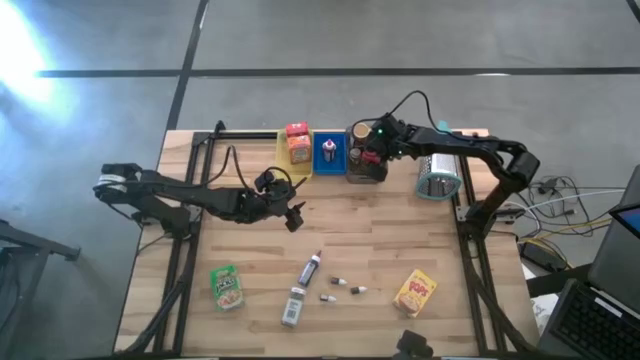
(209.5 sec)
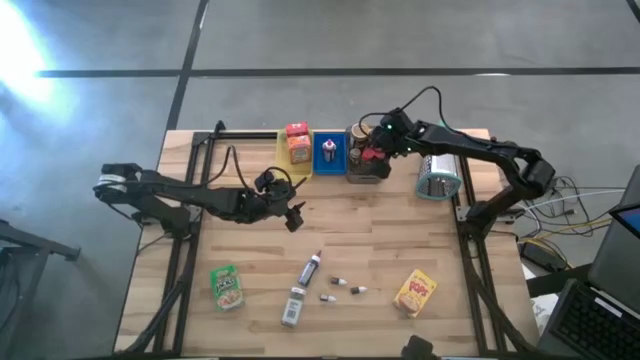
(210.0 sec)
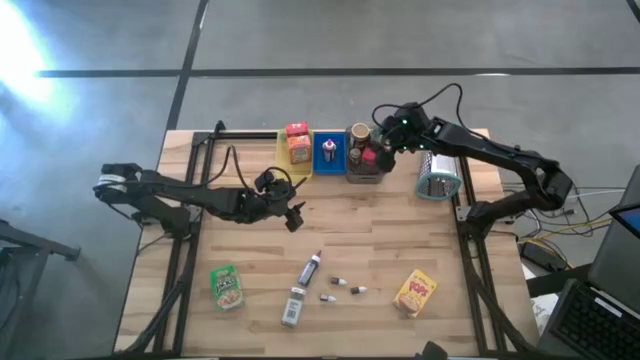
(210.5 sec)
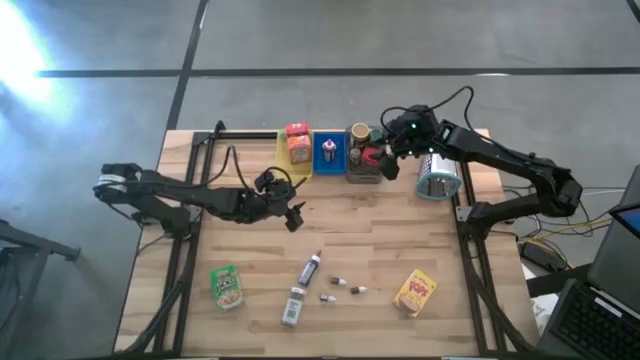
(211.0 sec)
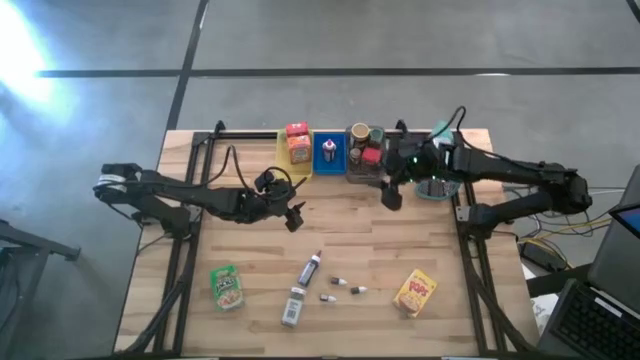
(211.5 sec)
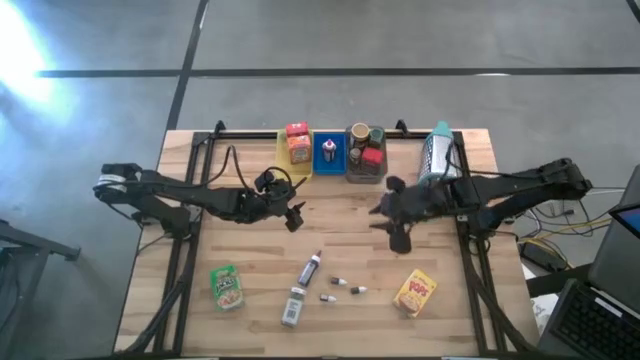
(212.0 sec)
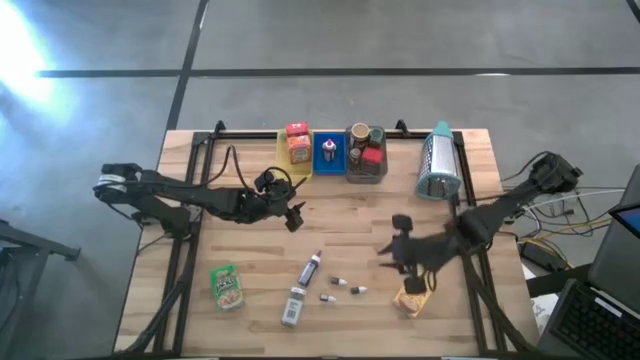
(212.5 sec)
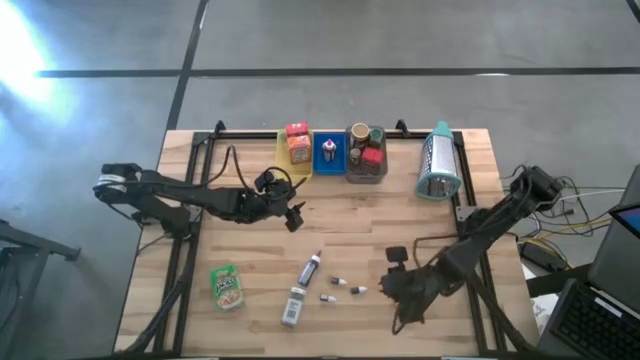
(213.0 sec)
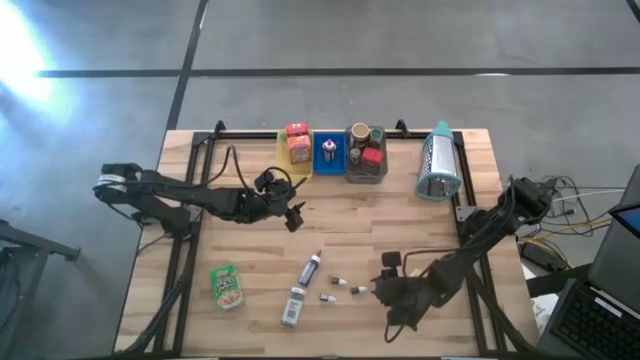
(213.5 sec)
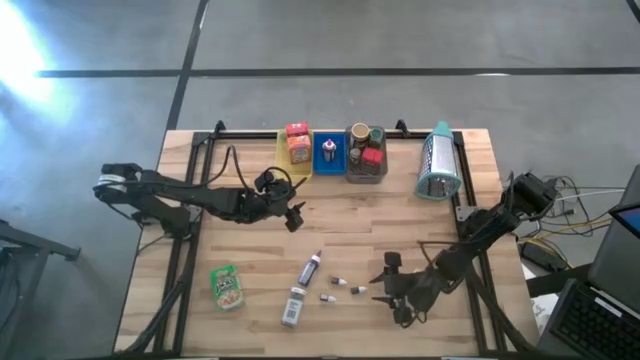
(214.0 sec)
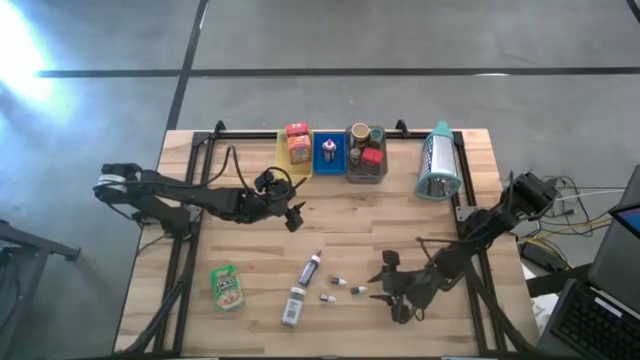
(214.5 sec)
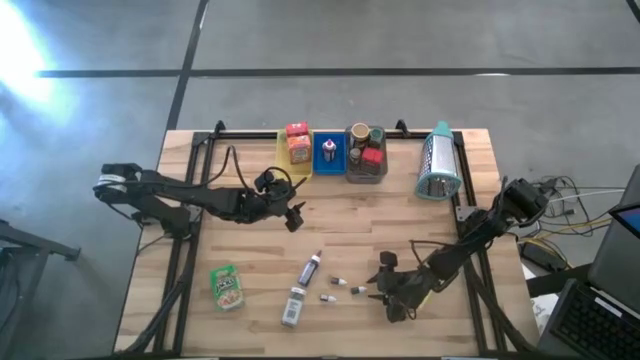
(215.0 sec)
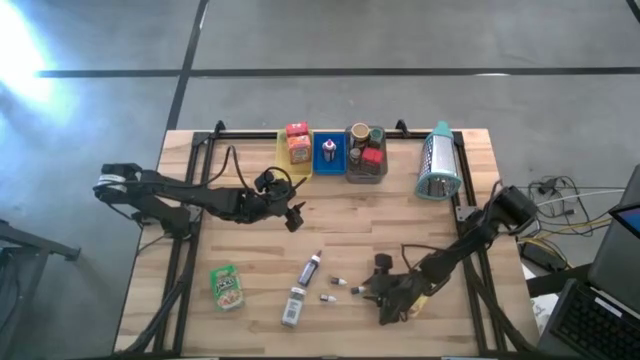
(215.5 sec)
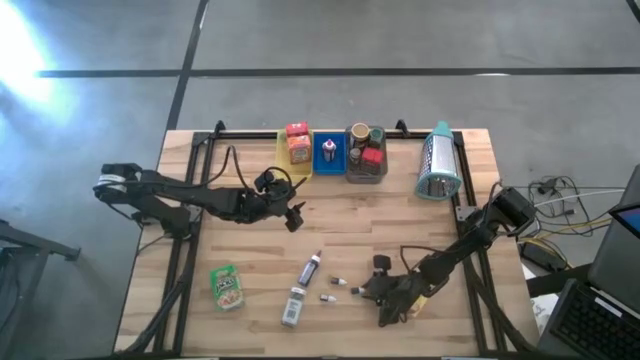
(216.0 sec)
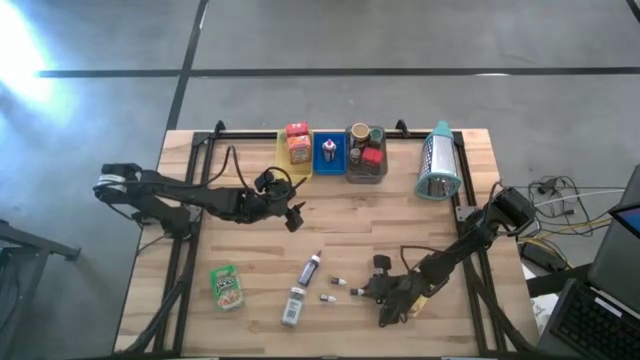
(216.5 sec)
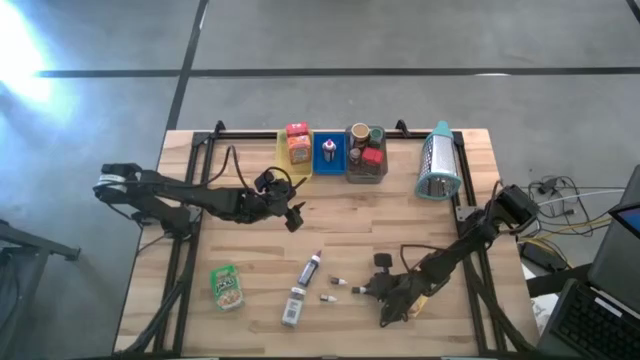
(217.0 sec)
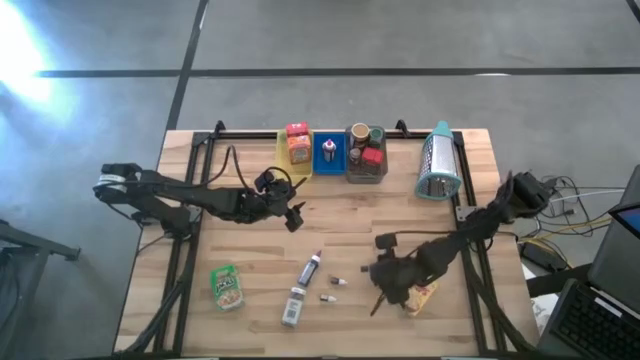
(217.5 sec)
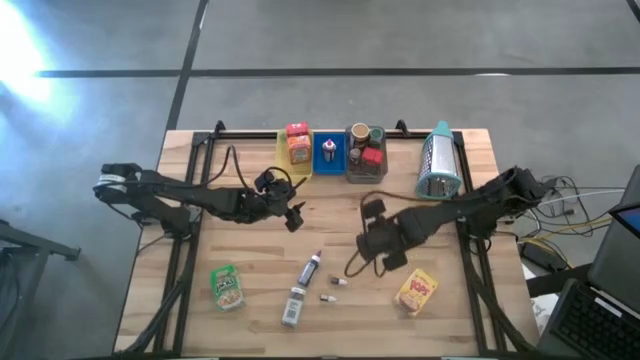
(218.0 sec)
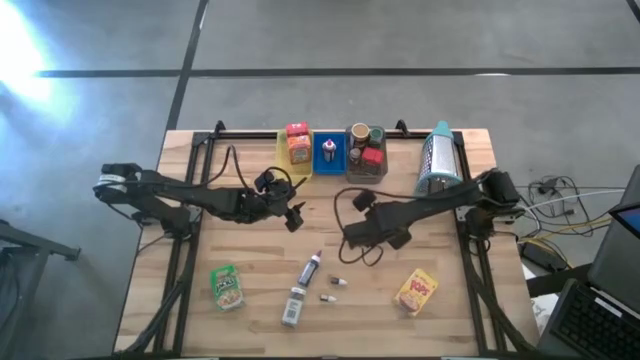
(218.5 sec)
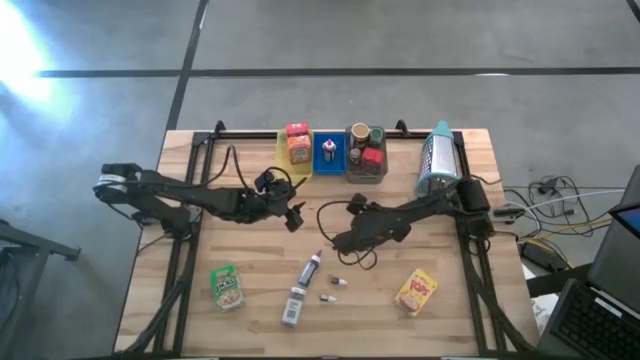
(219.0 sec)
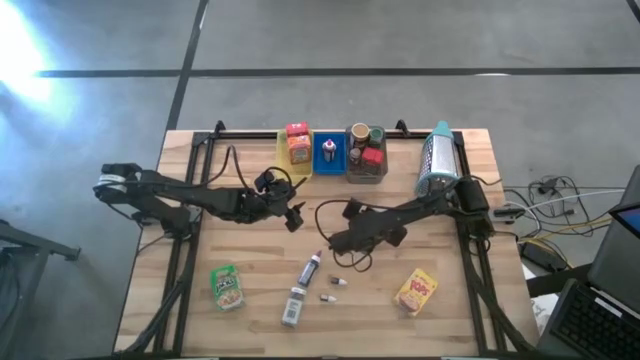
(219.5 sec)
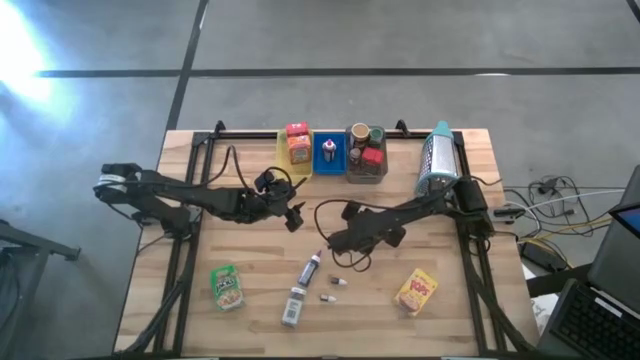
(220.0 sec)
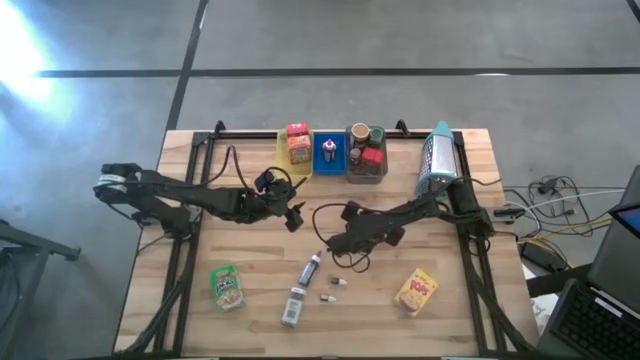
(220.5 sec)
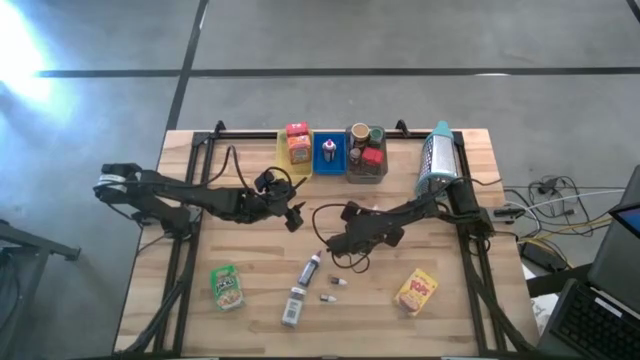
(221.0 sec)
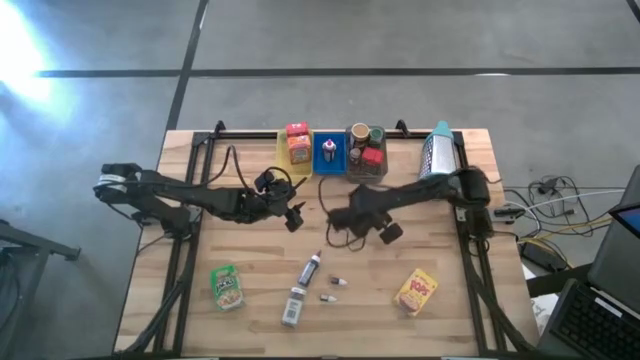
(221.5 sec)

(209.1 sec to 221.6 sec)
Task: Pick & Place Kitchen Items
Put the small blue food coloring bottle into the blue bin

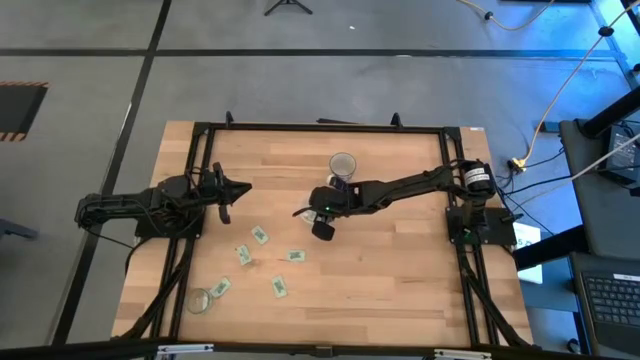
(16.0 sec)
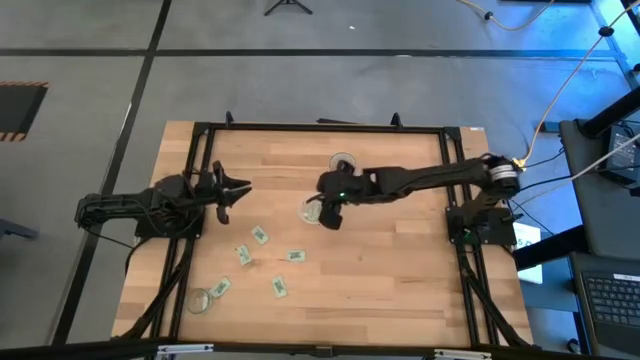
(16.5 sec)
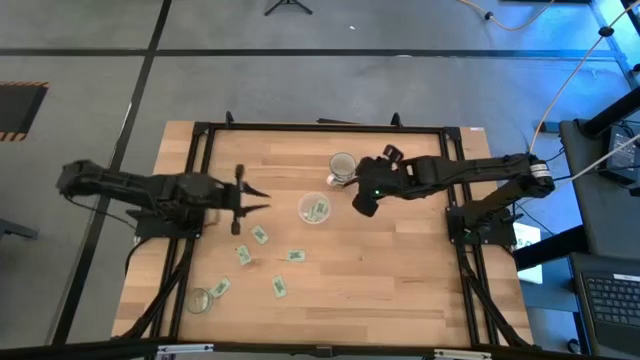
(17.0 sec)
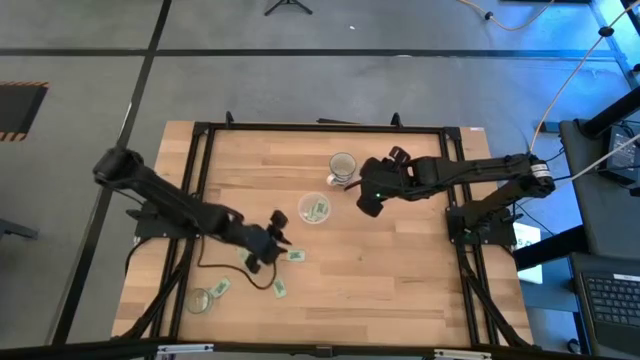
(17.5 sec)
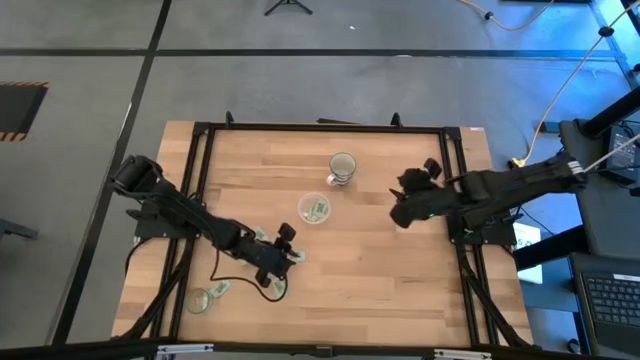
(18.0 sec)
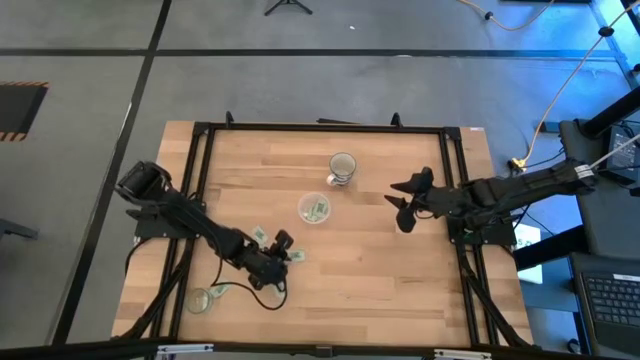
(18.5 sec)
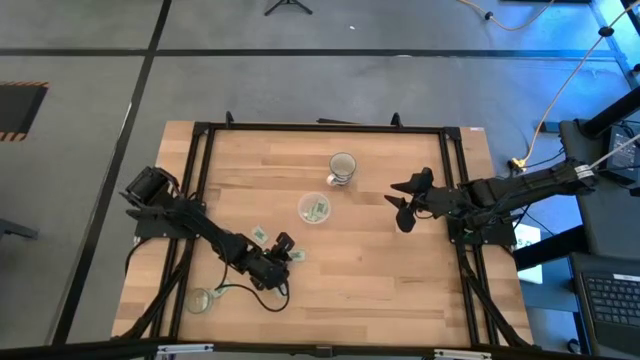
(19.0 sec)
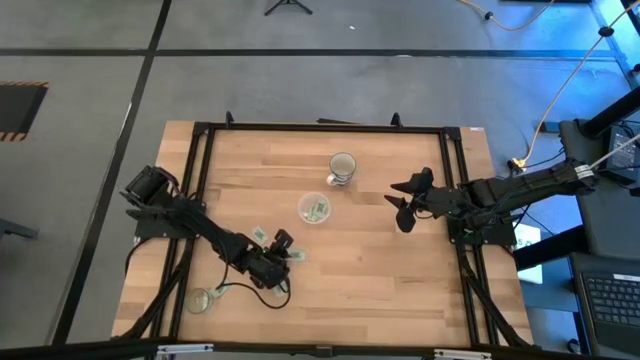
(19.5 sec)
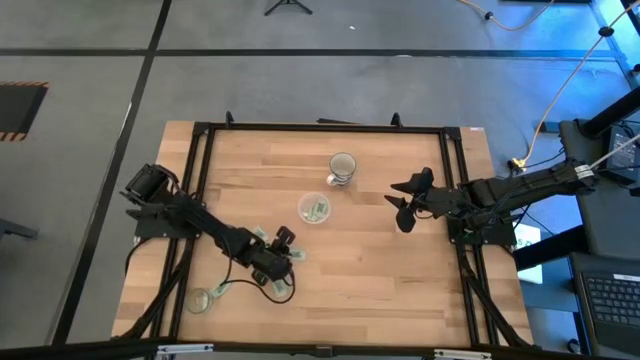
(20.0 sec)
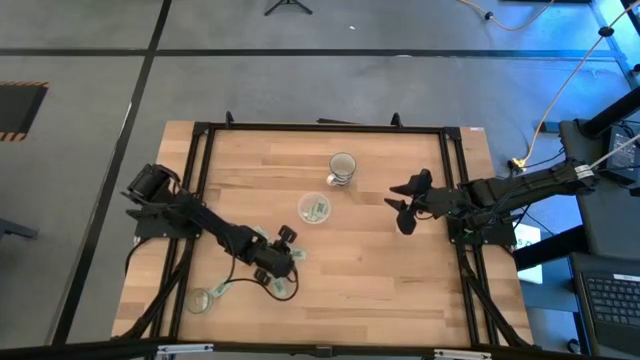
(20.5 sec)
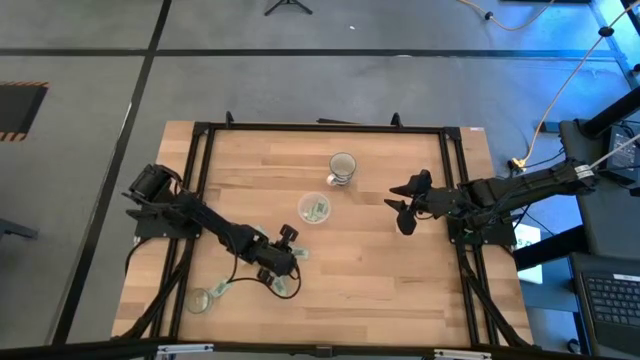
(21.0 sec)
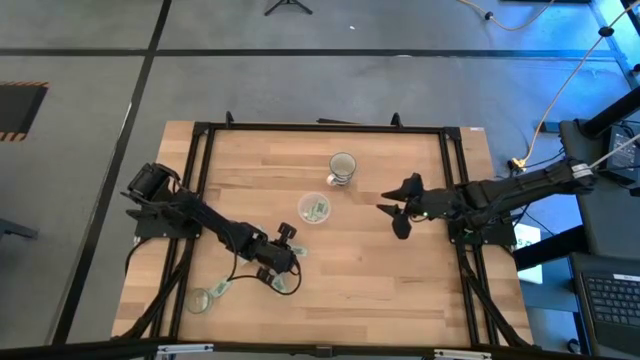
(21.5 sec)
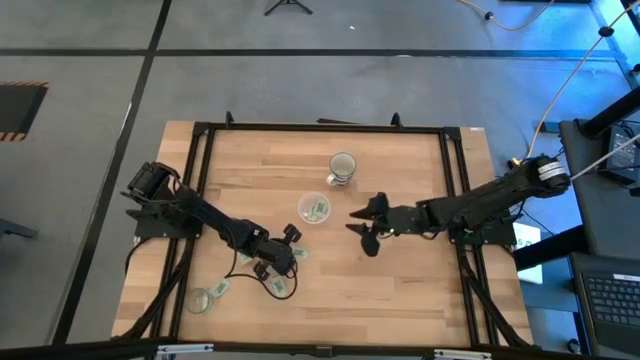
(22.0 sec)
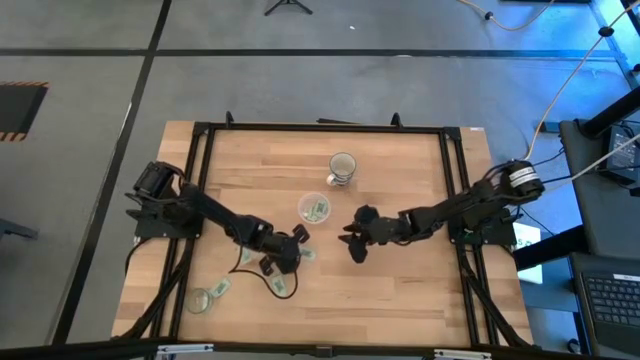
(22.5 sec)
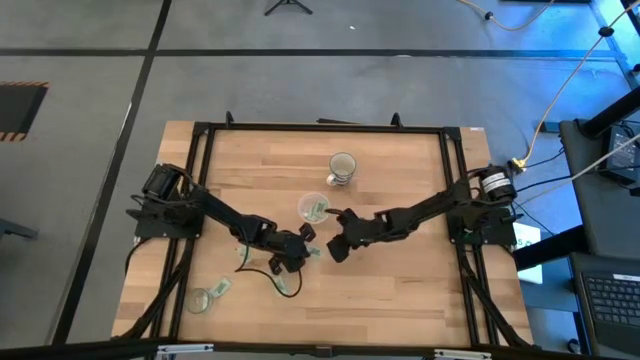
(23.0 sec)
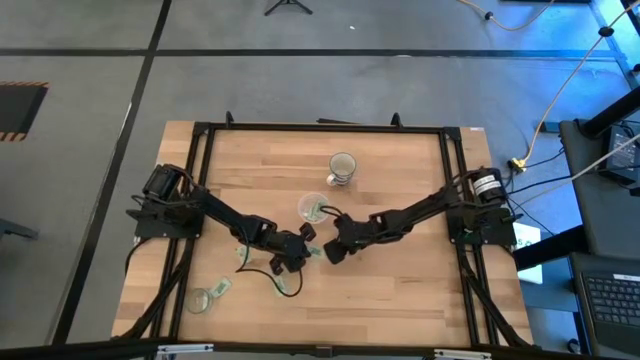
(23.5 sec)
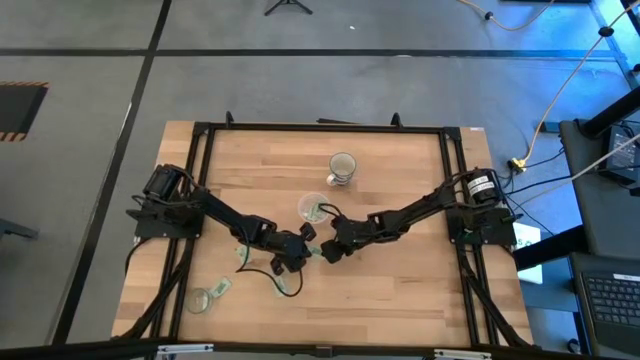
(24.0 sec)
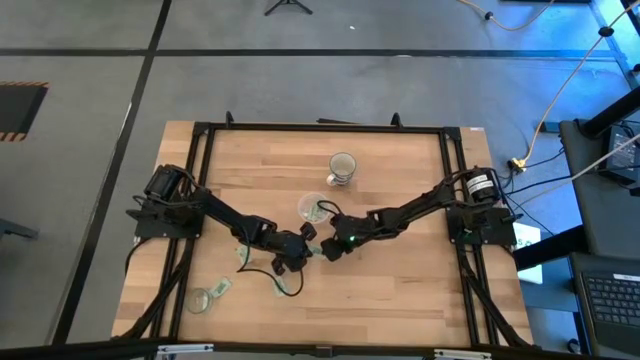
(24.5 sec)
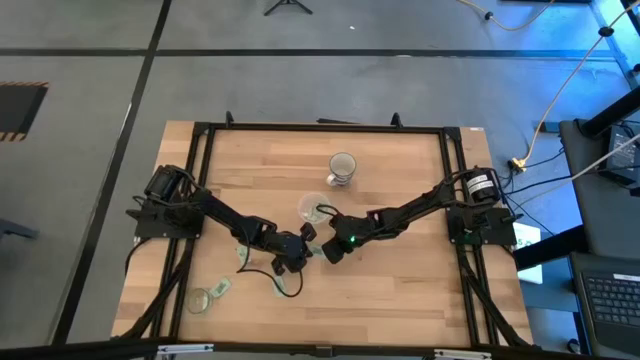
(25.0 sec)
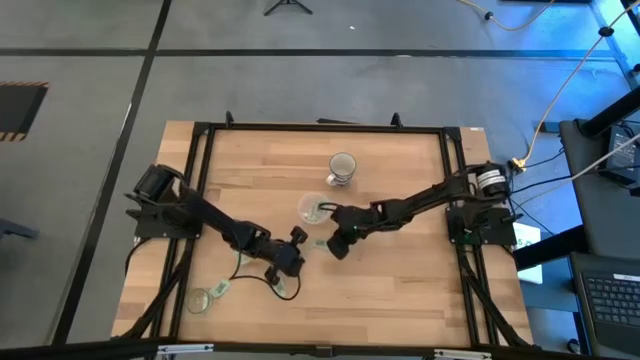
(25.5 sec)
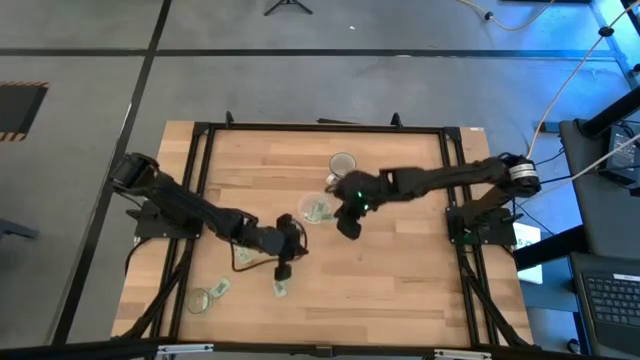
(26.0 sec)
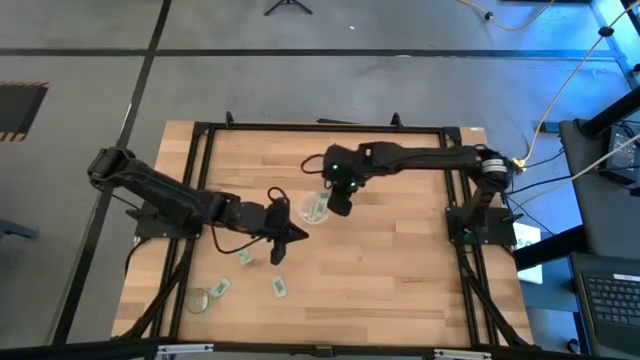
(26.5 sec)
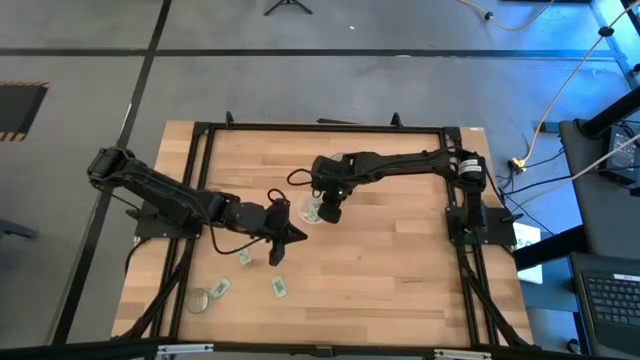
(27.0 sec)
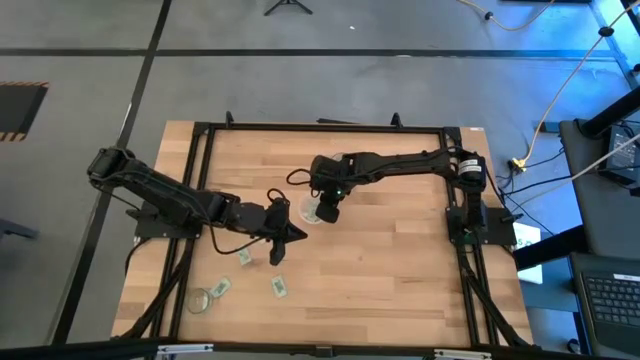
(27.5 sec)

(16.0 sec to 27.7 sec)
Task: Pick and place Stevia / Truvia into bins
Put the stevia packet into the transparent container
